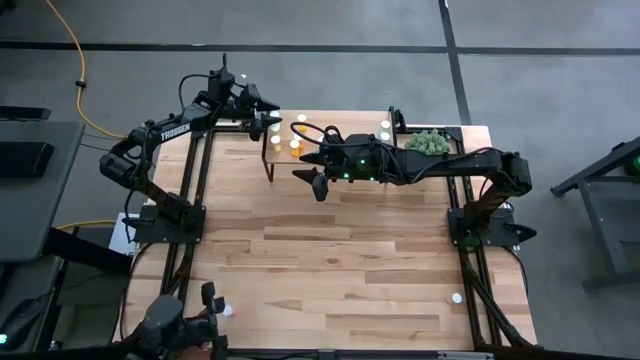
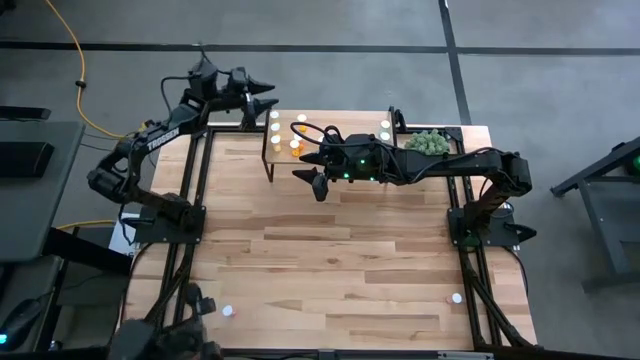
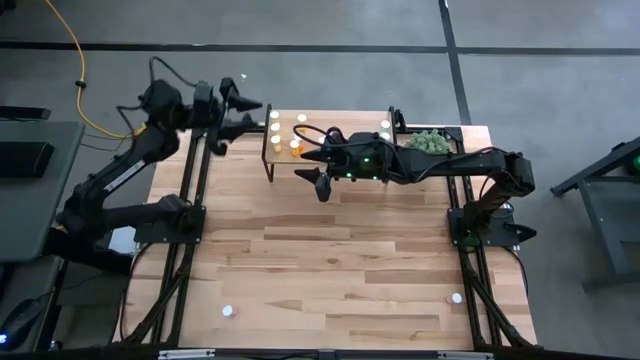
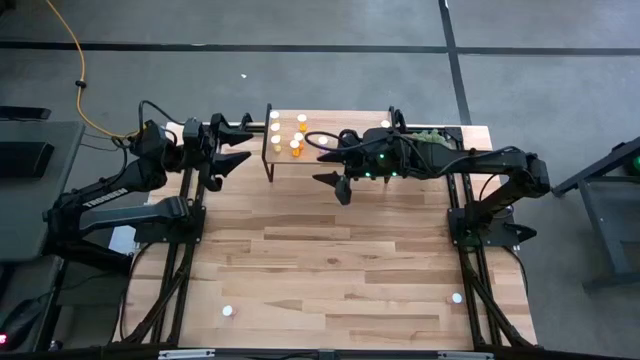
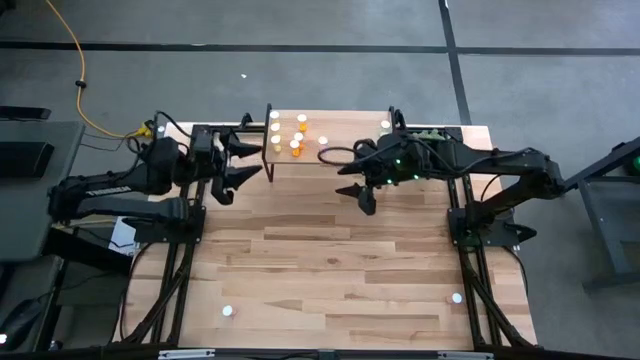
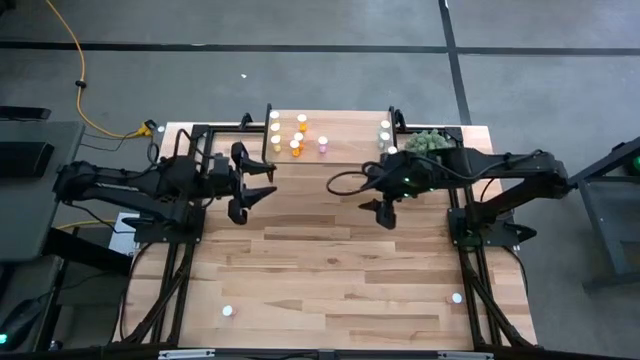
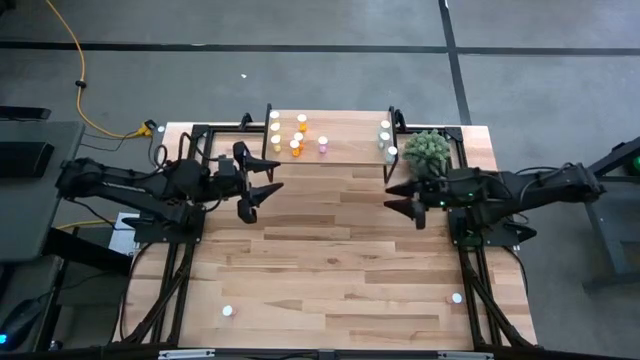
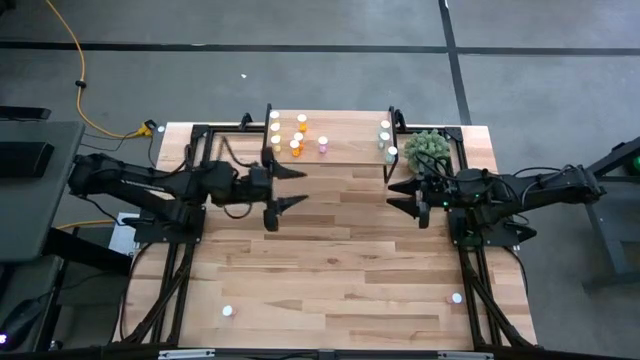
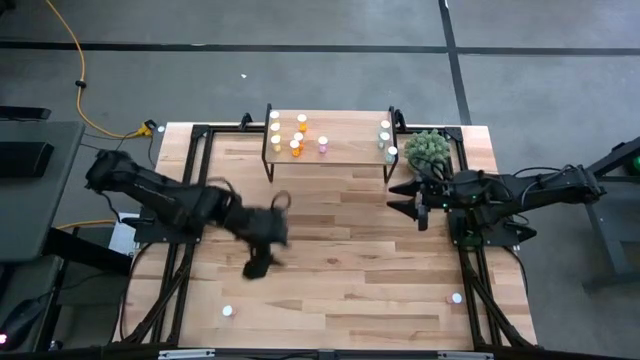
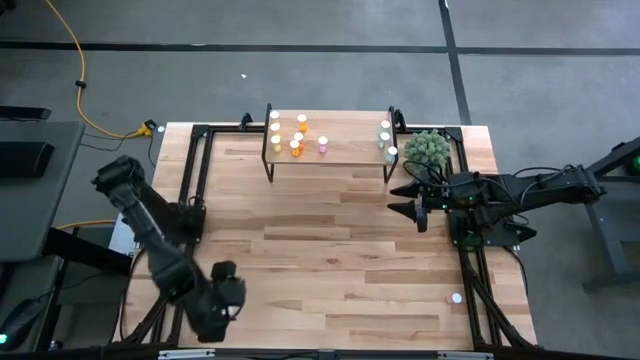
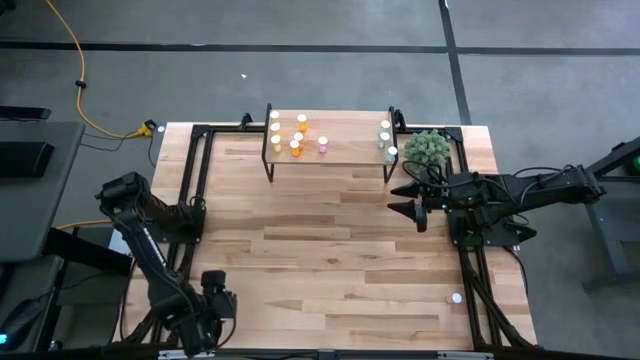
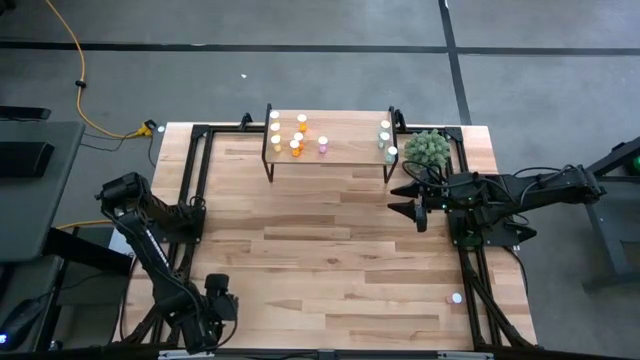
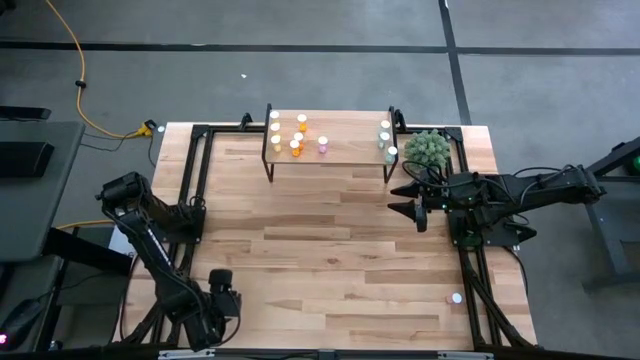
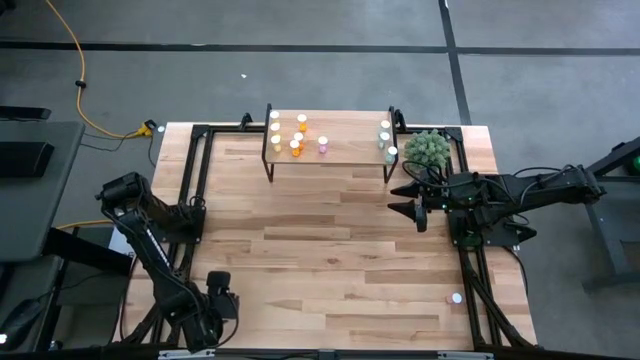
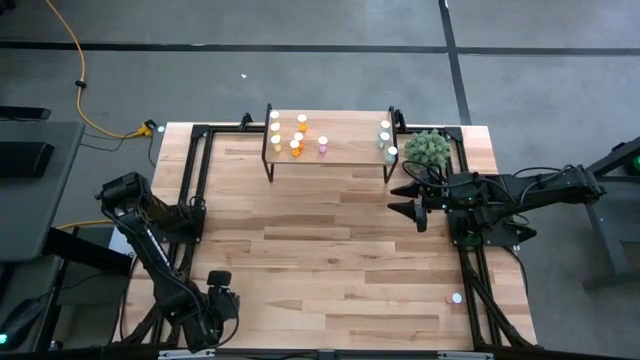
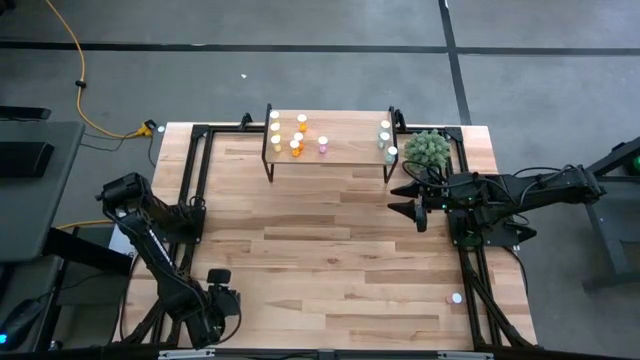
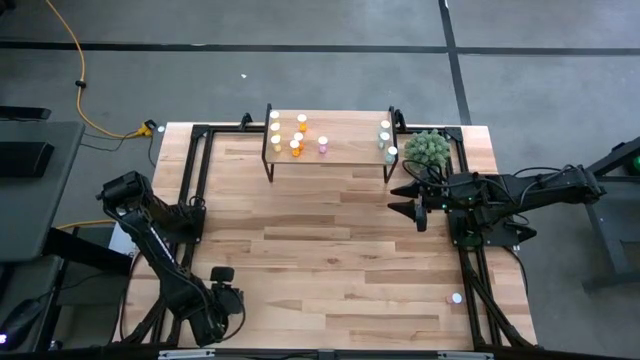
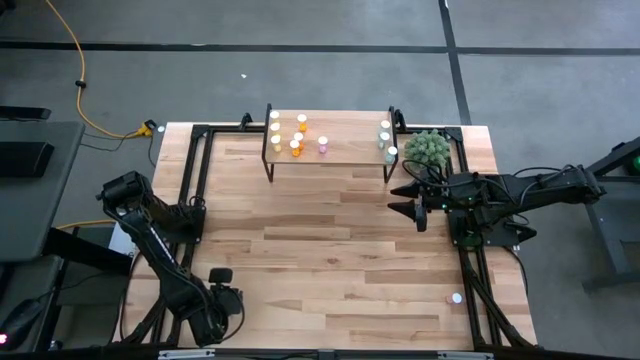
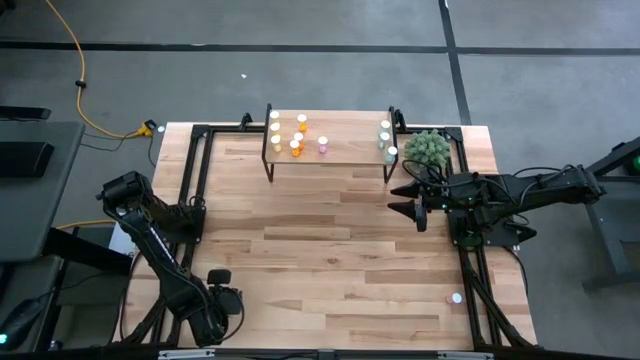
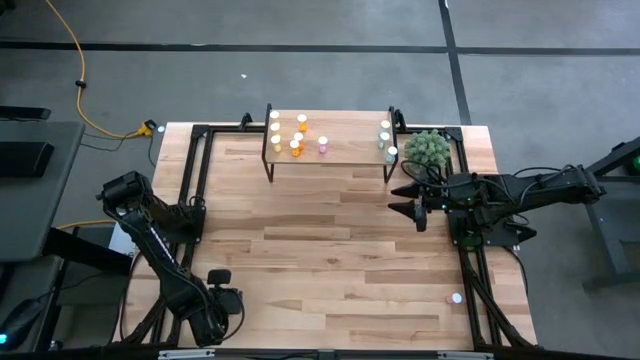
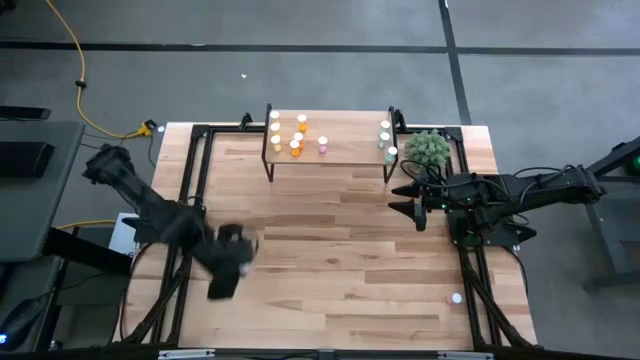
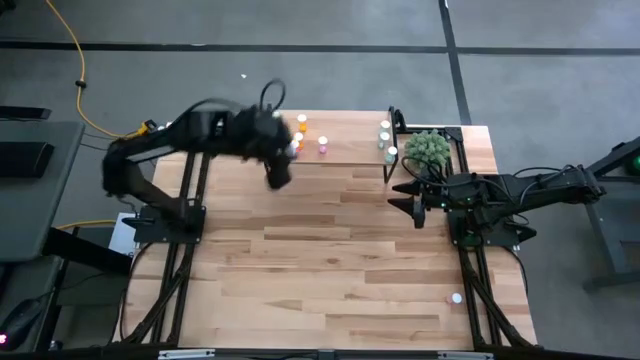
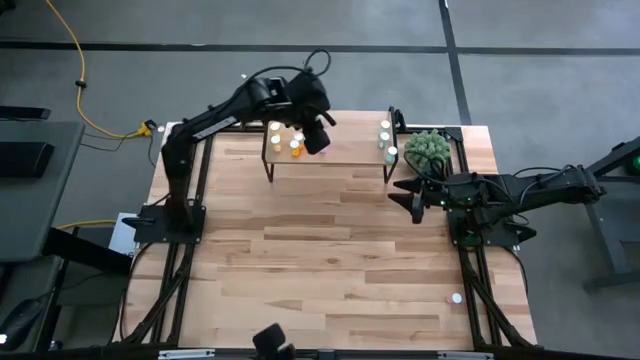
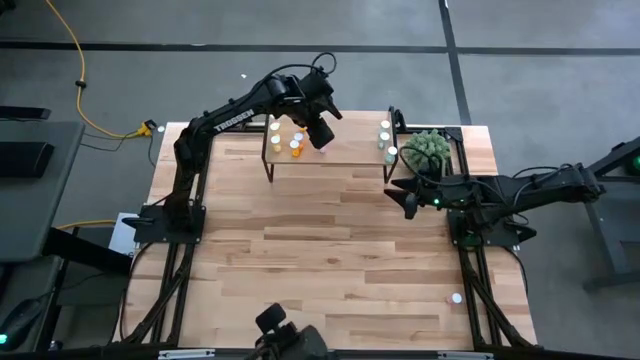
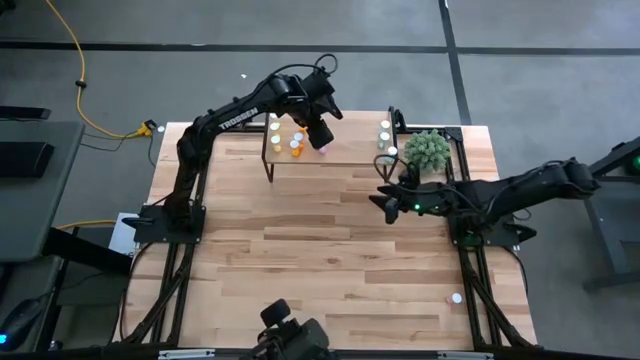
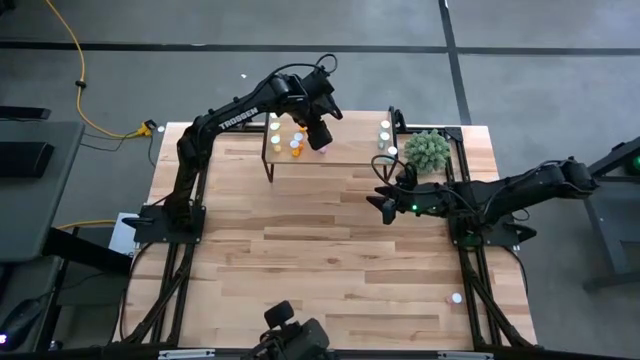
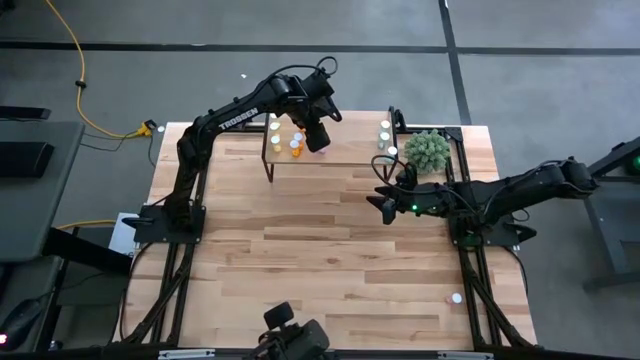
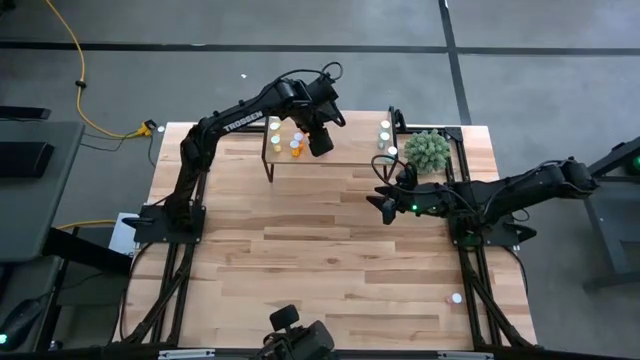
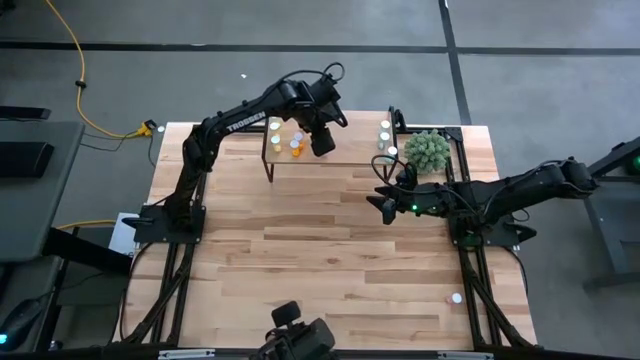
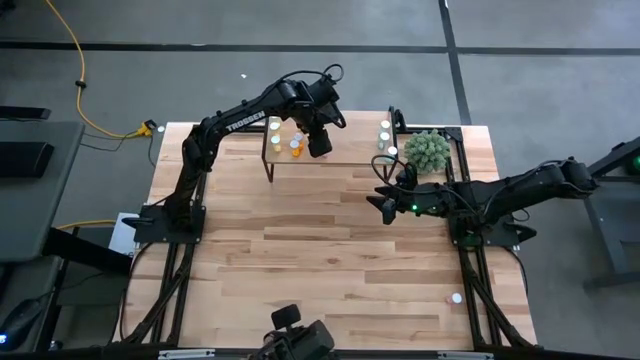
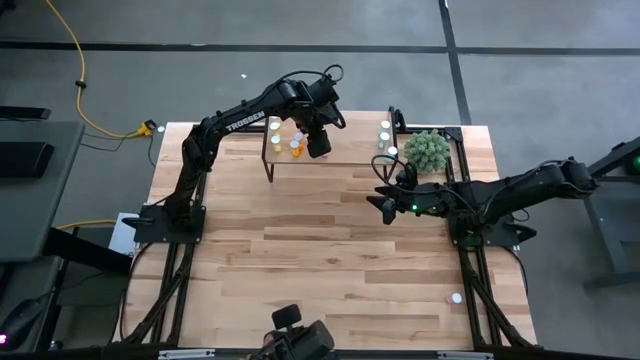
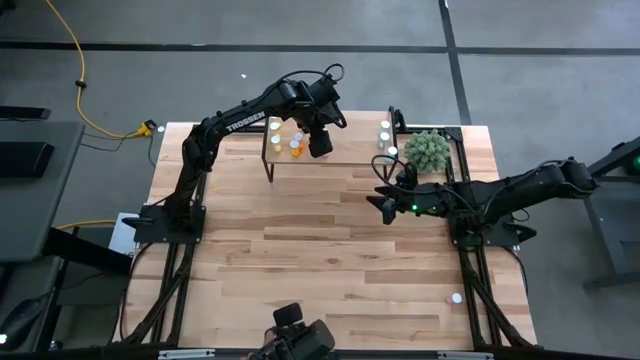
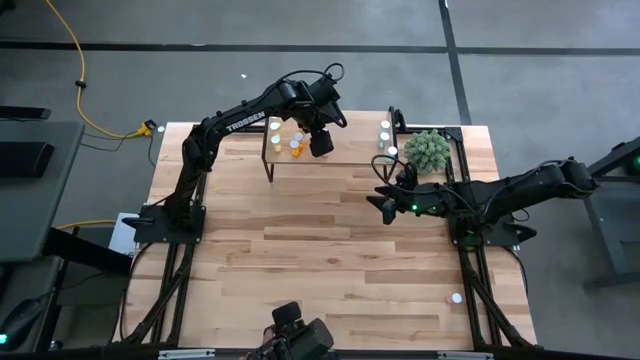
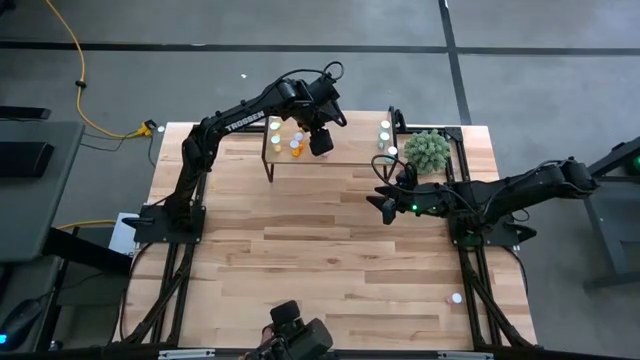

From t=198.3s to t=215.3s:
Task: Pick and place medicine bottles onto shelf by color
Put the left pink pill bottle aligned with the other pink bottle on the shelf

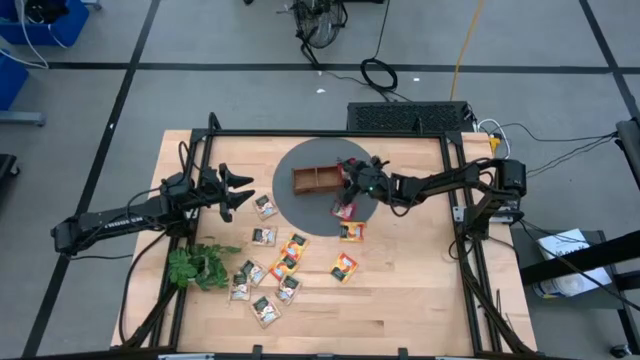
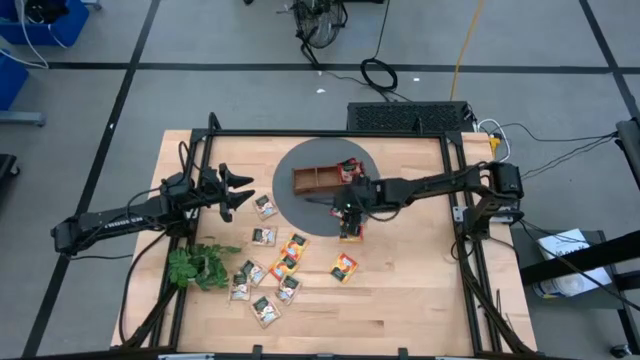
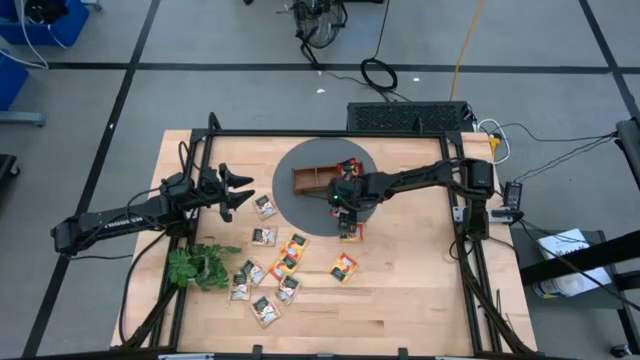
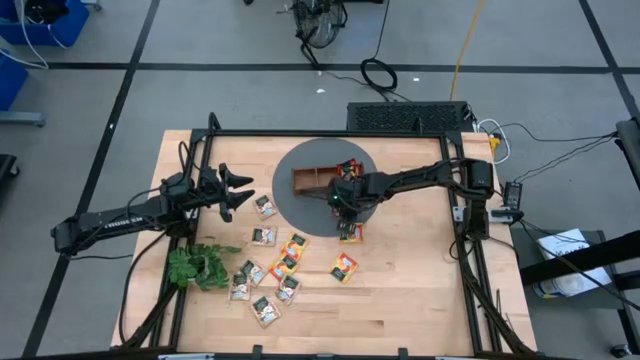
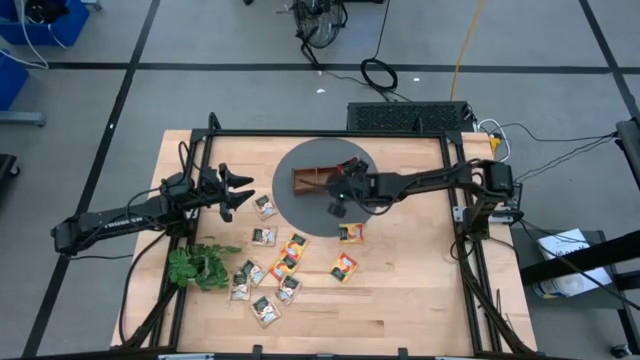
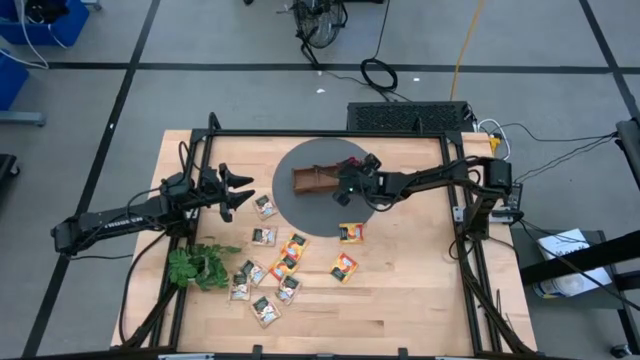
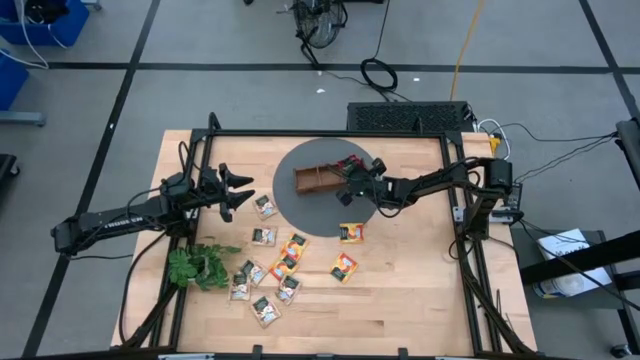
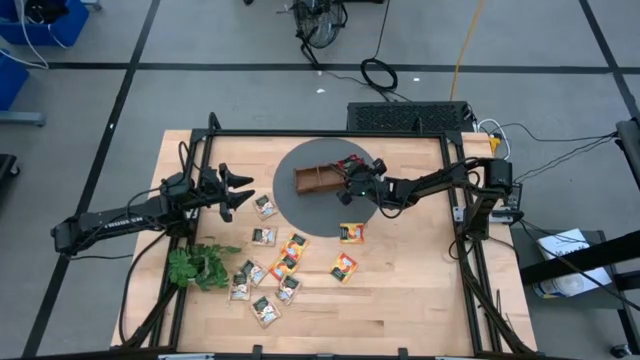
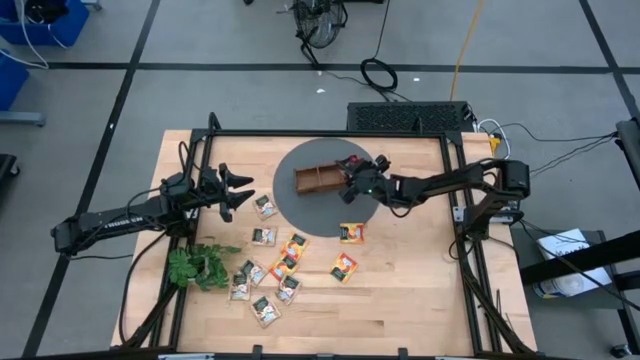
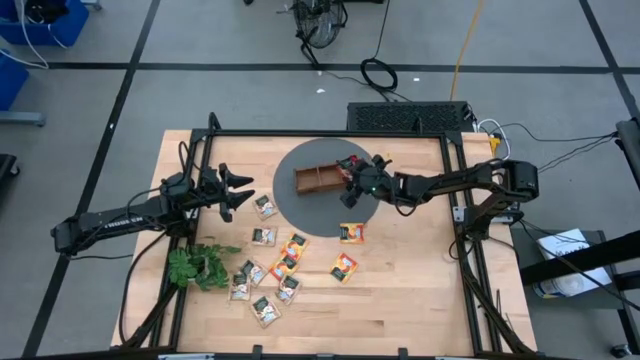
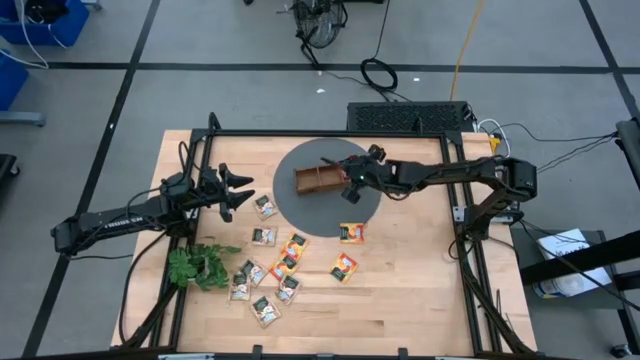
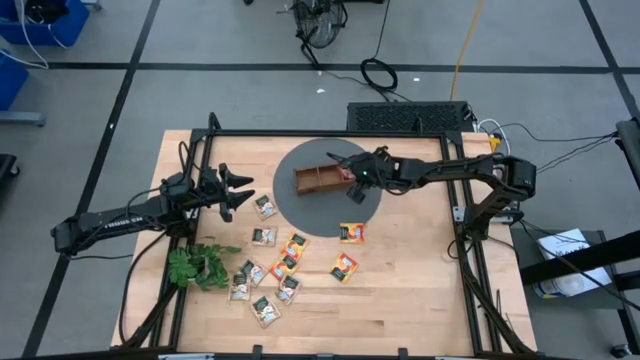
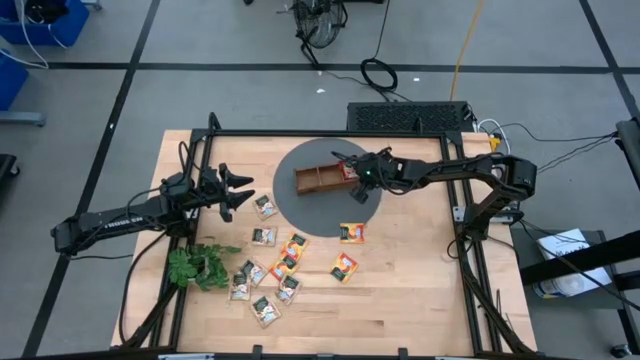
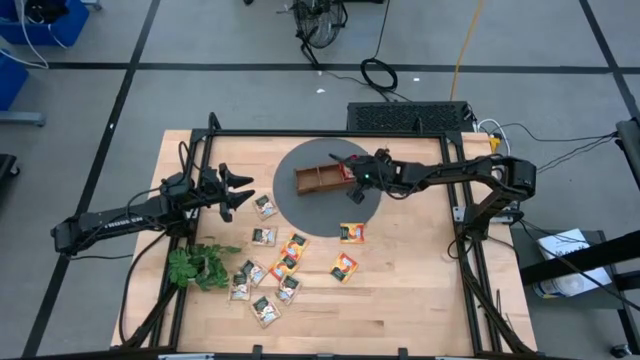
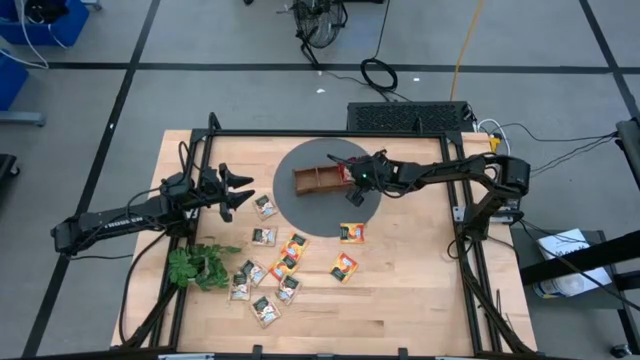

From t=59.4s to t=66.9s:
Task: Pick & Place Tea
Put the red tea bag into the right section of the wooden organizer
